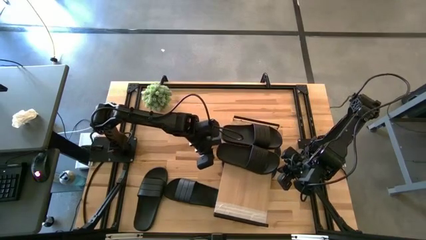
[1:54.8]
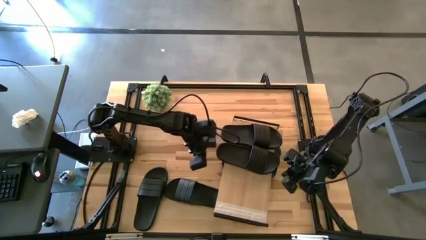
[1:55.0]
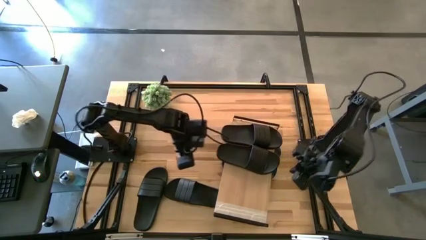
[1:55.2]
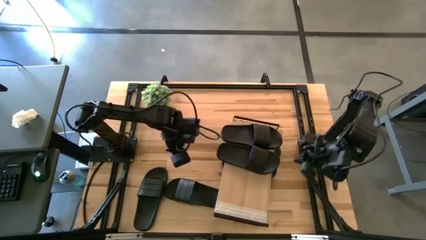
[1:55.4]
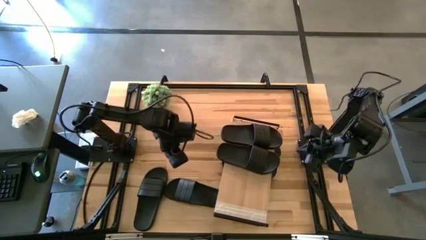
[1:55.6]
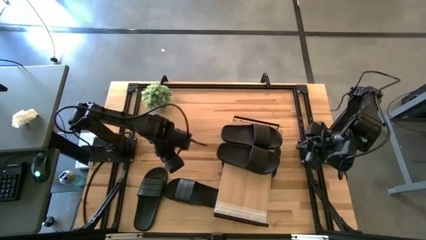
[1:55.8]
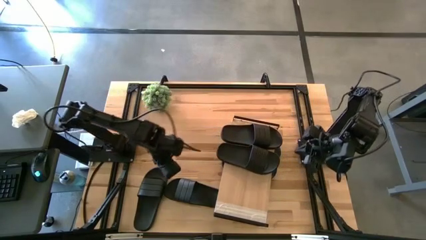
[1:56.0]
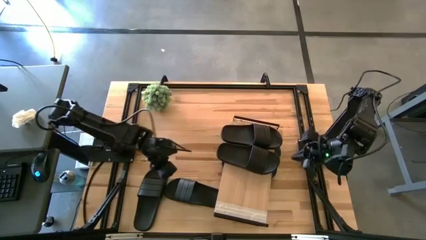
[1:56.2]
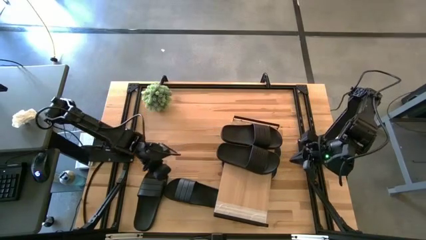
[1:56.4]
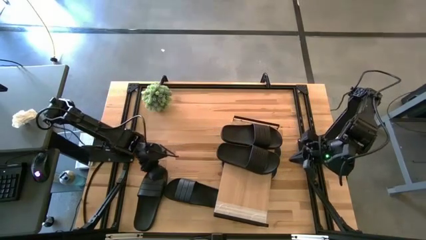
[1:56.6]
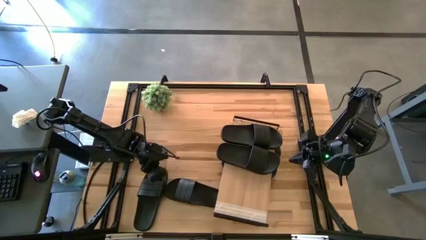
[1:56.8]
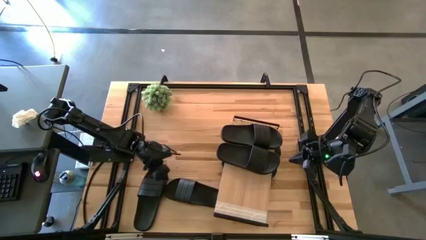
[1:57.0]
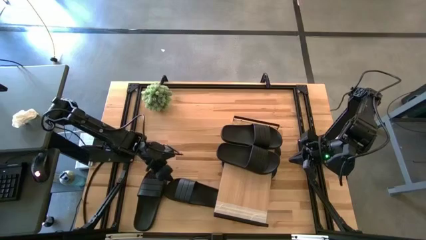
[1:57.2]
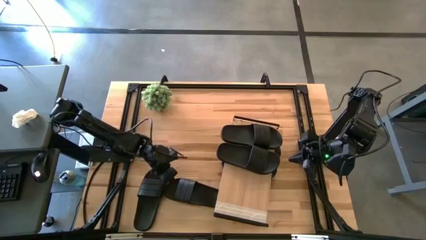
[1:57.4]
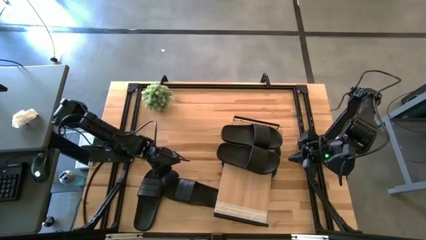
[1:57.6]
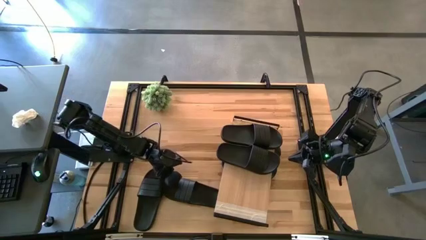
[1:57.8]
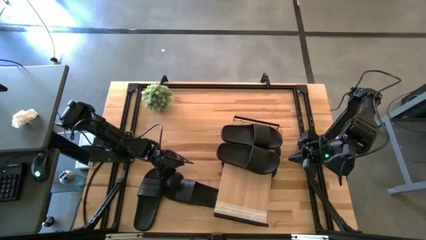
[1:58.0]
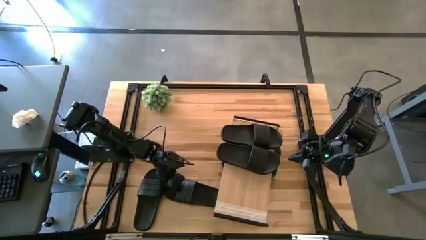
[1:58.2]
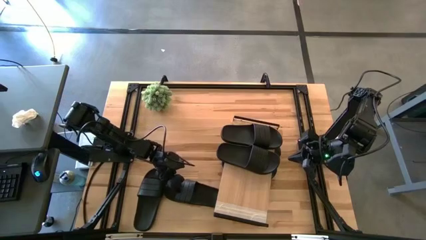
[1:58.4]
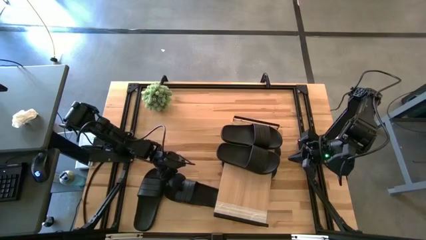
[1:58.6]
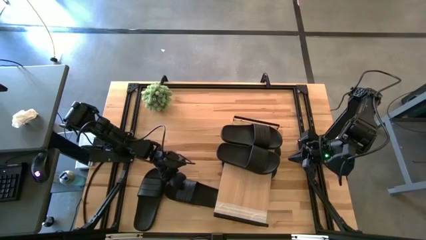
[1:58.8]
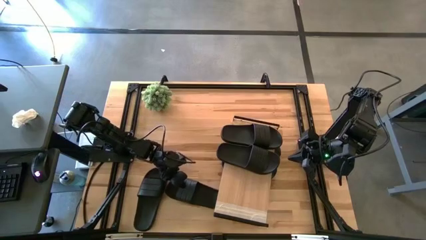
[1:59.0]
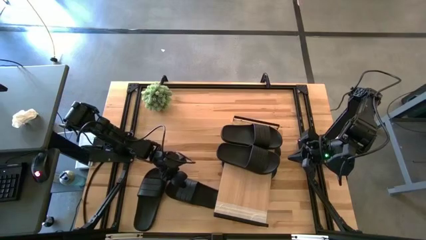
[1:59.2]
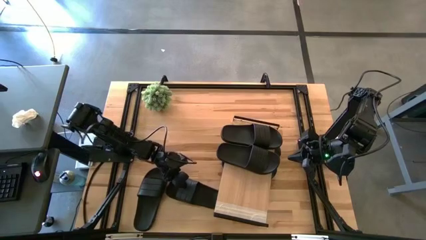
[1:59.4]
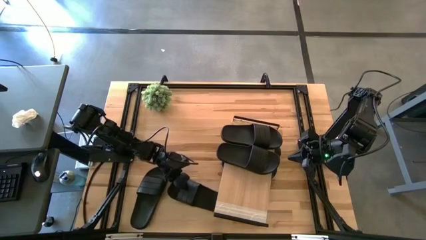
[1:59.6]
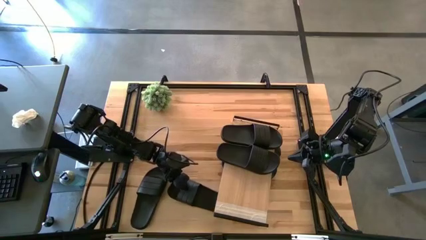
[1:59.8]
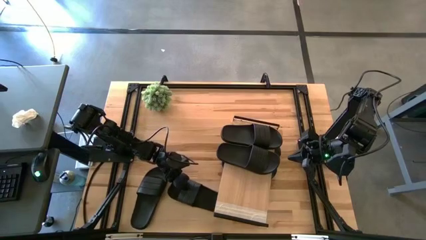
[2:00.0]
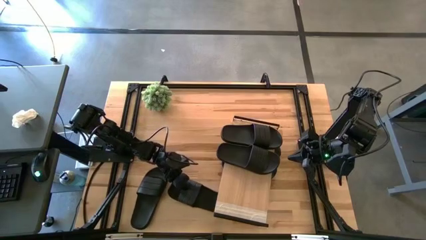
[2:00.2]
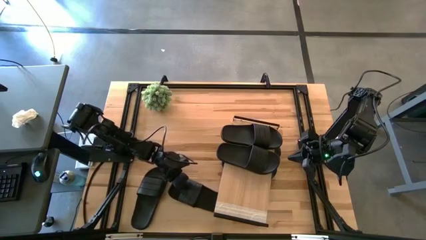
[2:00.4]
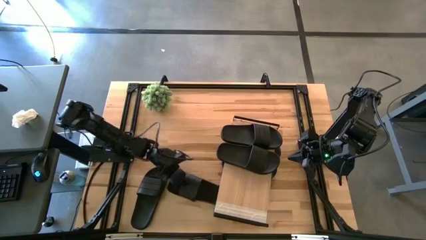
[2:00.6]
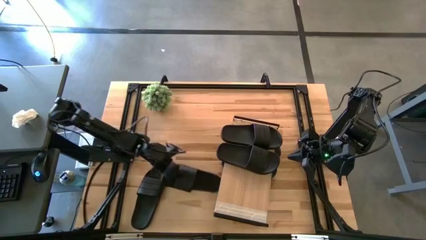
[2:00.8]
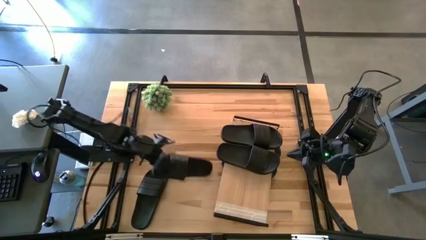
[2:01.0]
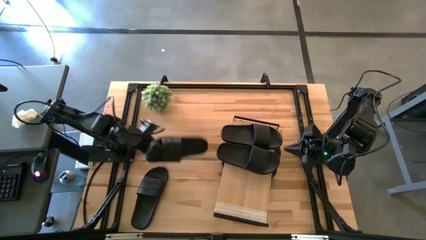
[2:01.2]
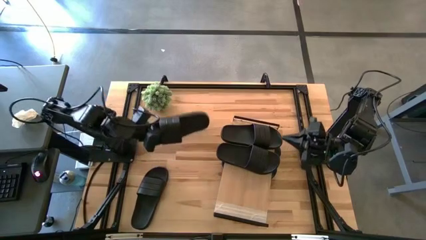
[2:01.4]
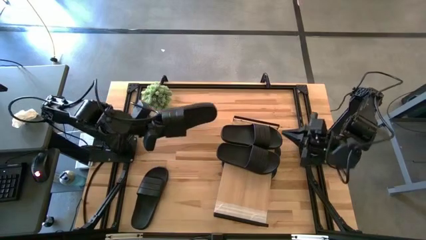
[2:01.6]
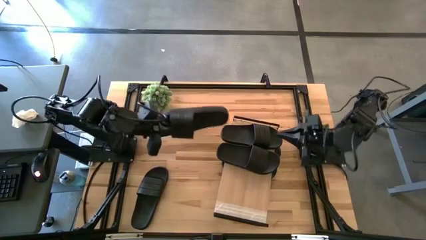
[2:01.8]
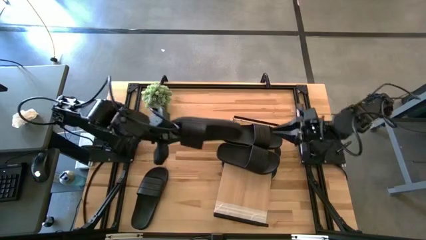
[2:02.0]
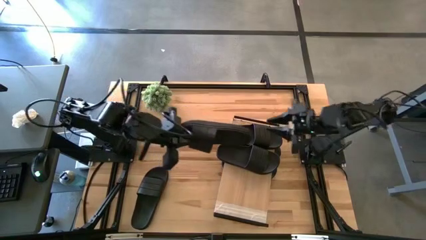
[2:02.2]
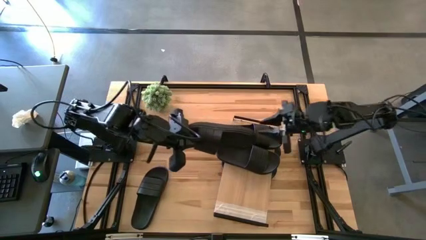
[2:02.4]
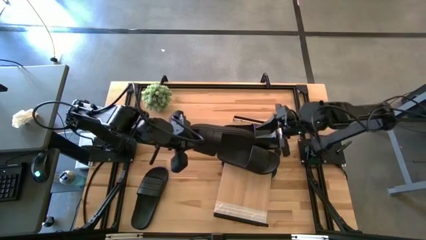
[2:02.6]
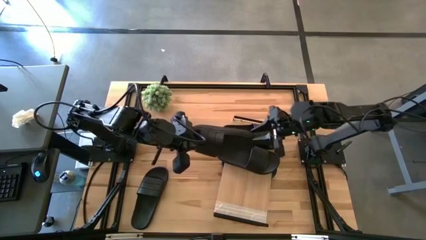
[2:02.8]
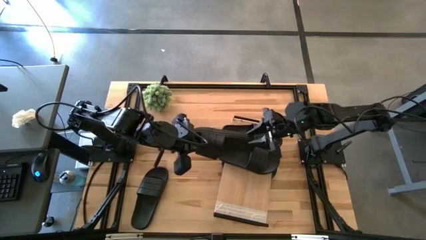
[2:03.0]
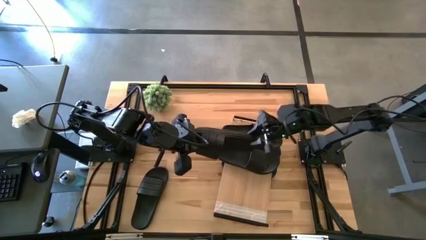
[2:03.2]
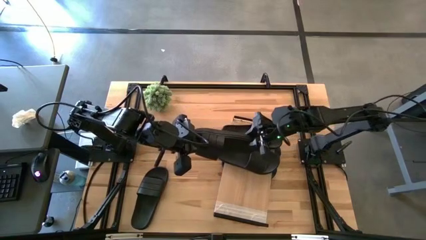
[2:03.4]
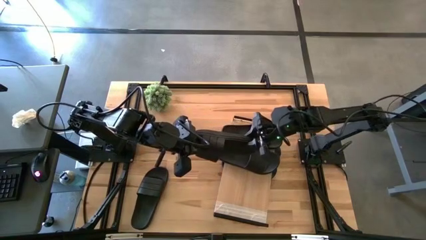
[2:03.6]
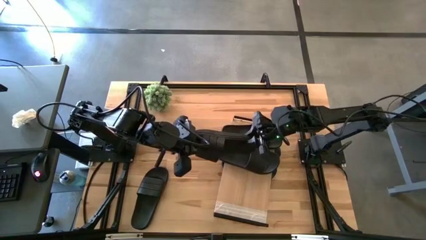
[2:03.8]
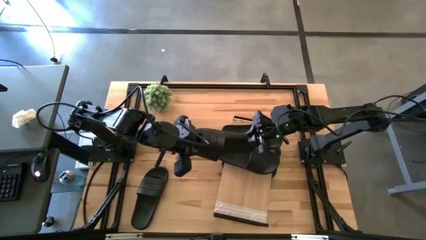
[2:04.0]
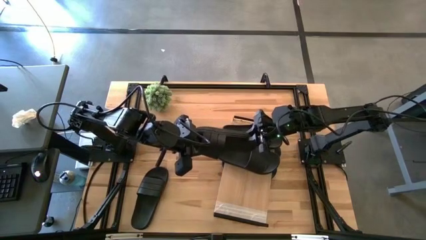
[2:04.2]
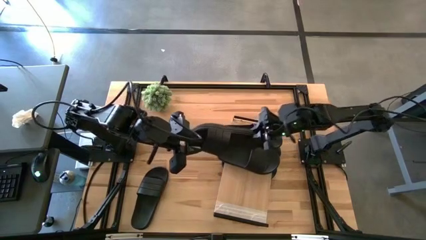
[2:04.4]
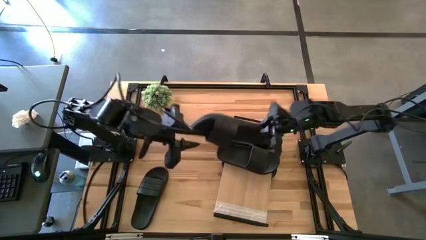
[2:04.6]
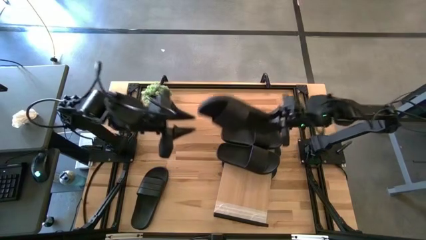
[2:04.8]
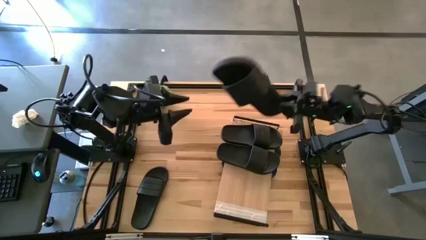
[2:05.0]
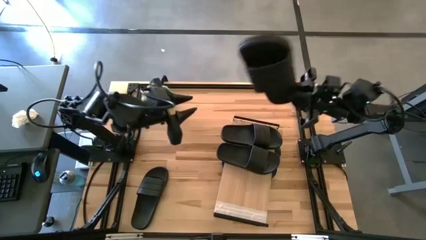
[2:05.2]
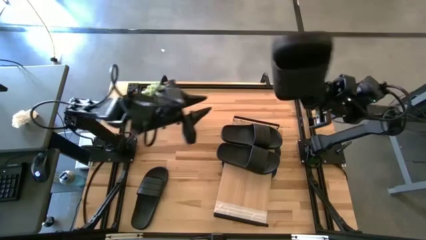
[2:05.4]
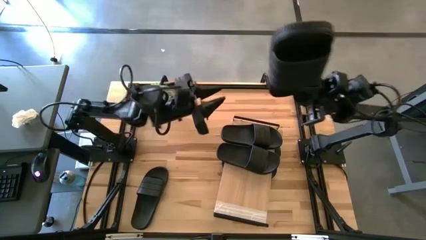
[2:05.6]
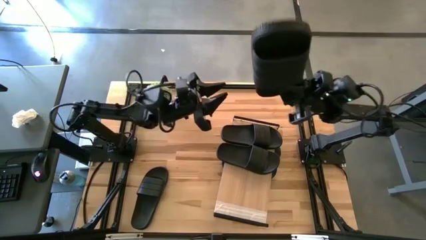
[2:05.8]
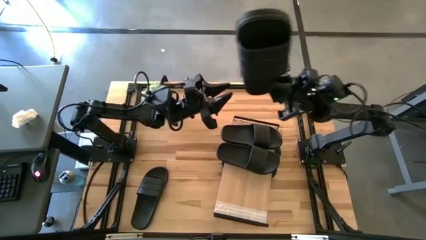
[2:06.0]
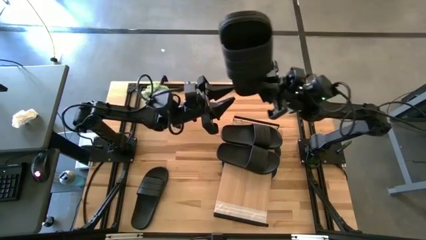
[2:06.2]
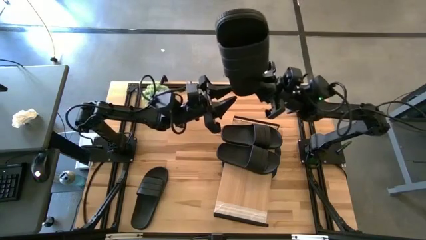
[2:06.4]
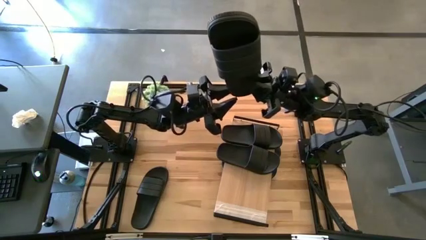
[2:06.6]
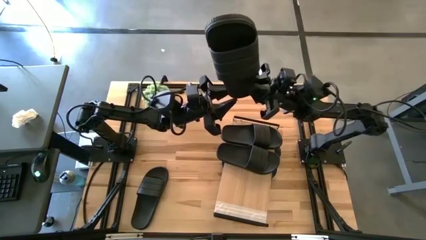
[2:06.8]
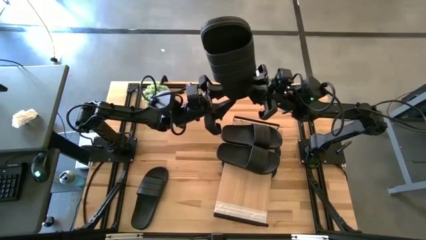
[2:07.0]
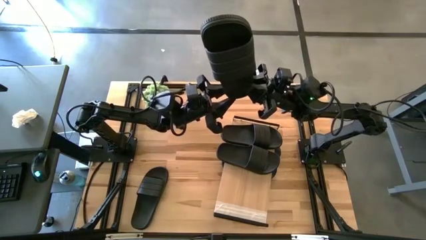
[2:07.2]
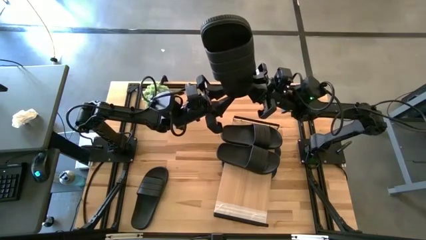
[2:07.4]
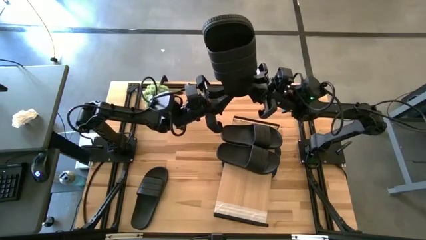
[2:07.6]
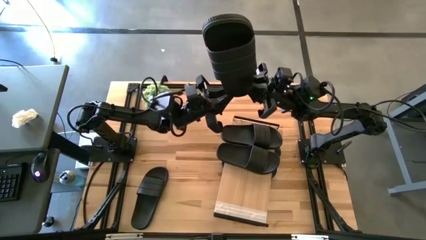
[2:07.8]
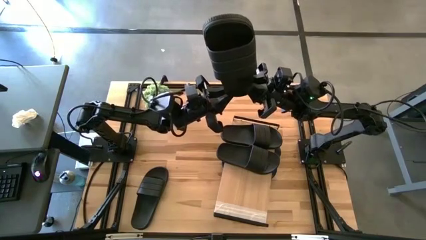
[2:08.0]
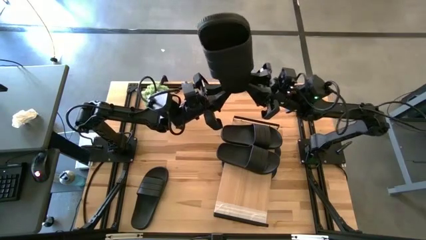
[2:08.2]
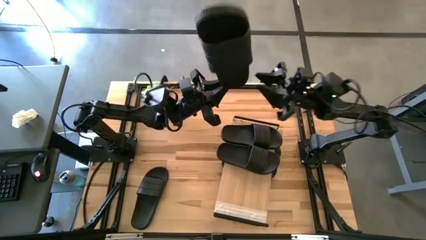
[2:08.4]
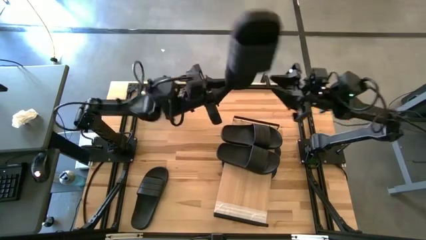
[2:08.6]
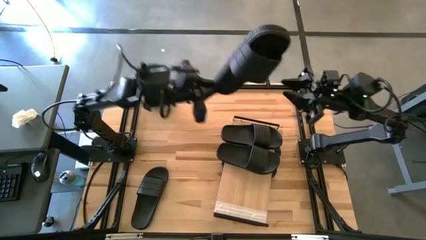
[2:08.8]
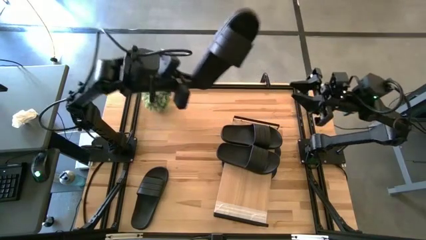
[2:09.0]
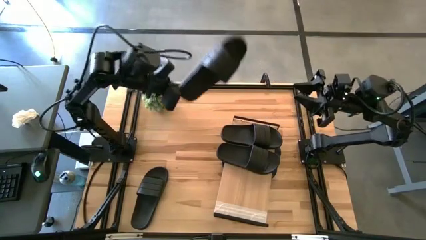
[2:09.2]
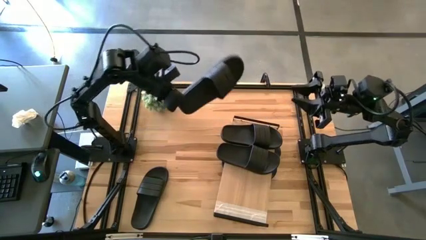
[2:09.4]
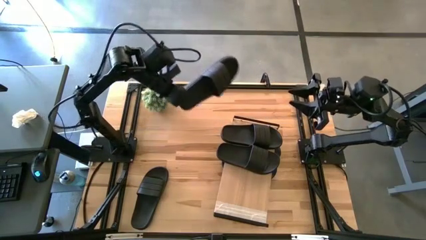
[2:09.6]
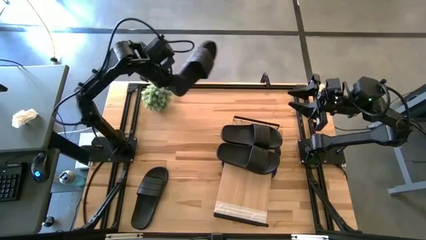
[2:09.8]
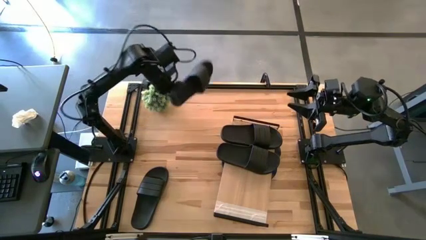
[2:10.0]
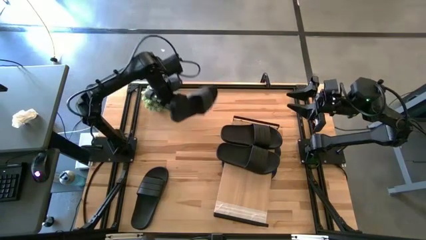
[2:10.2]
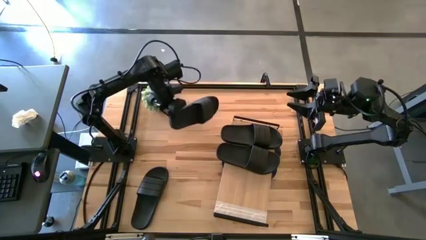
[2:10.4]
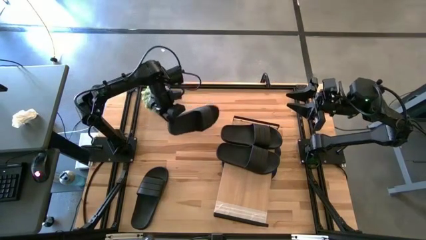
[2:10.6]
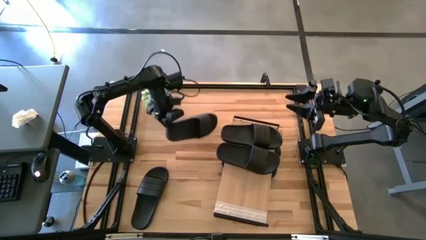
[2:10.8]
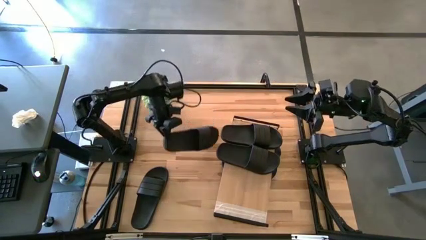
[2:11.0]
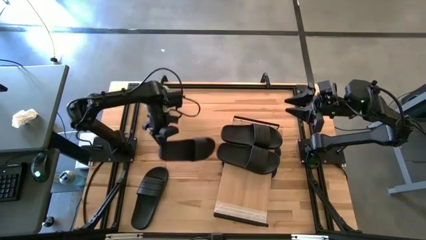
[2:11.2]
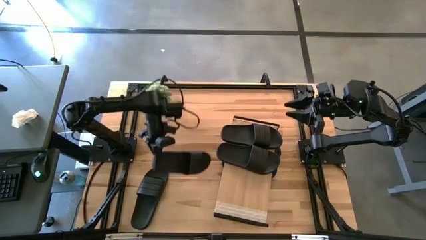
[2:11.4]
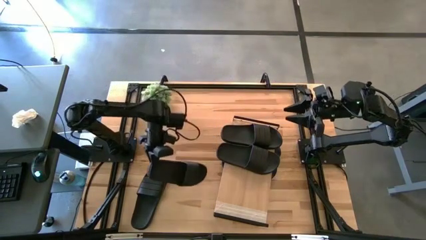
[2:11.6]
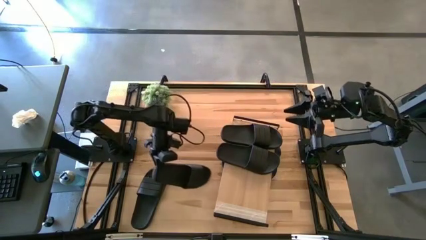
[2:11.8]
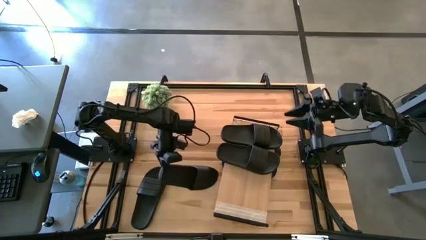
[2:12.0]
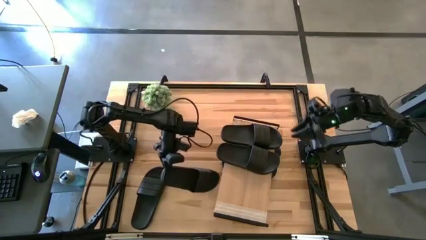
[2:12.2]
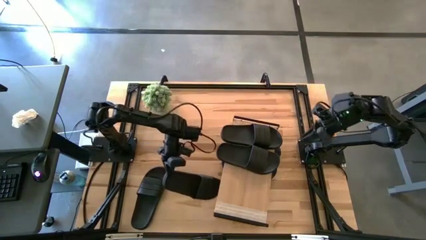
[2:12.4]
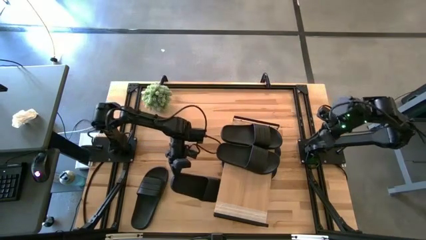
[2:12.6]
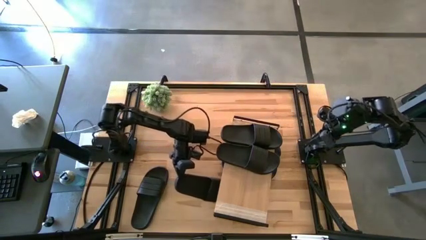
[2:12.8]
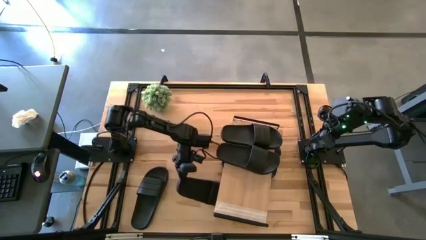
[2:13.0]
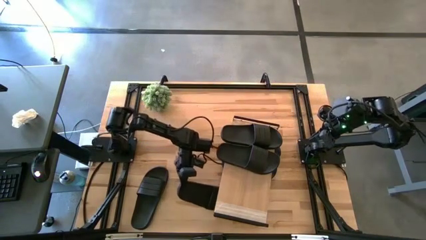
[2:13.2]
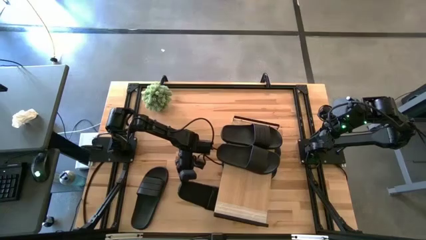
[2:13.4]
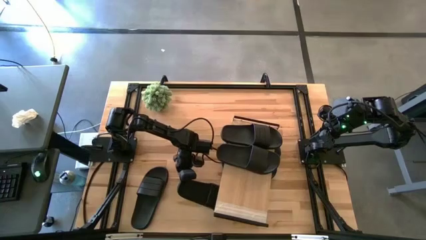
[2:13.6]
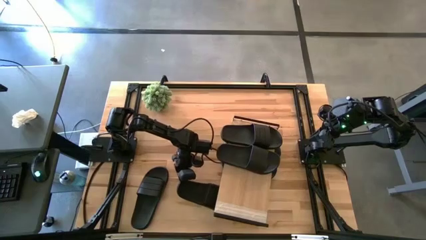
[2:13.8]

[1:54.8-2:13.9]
Task: Pick and place slides into the shelf
Put the right black slide under the shelf
